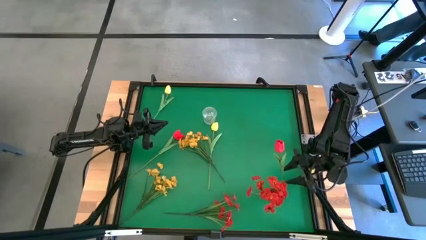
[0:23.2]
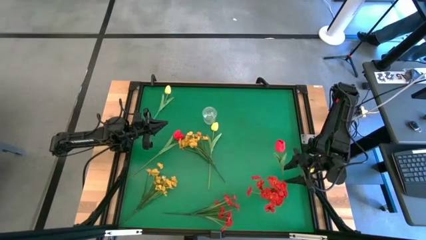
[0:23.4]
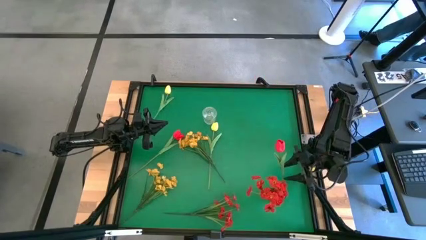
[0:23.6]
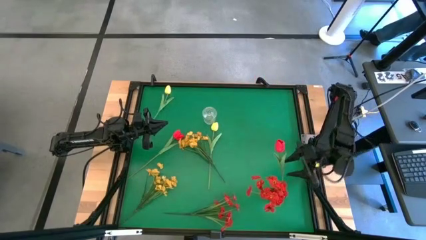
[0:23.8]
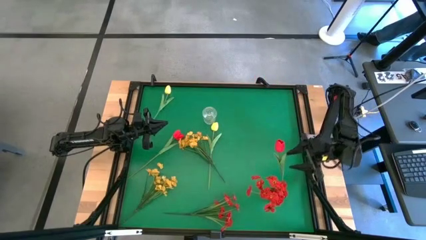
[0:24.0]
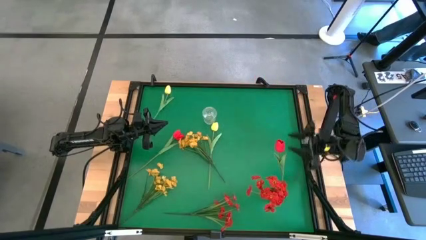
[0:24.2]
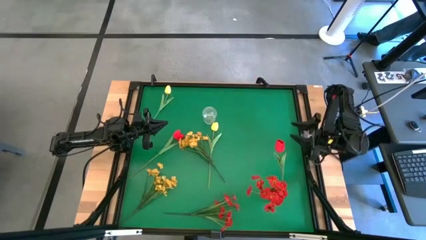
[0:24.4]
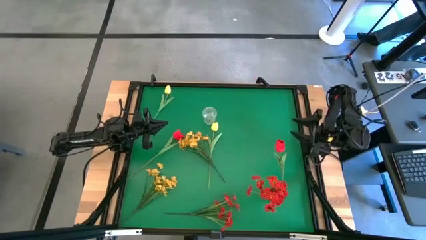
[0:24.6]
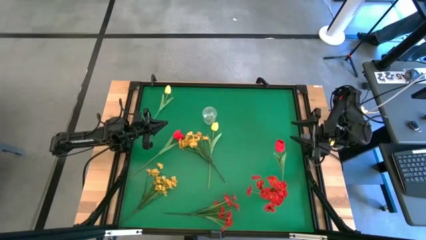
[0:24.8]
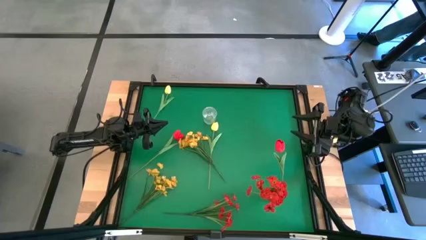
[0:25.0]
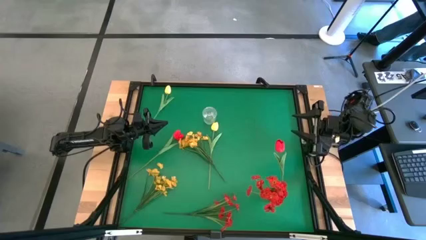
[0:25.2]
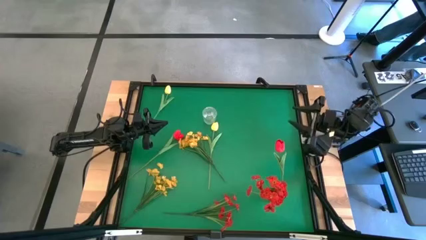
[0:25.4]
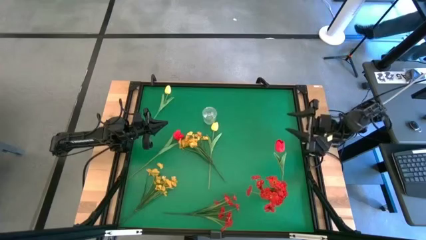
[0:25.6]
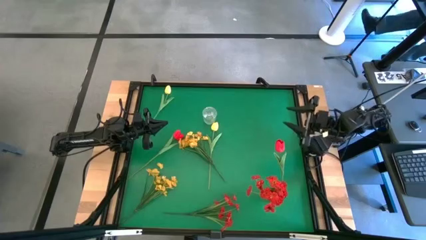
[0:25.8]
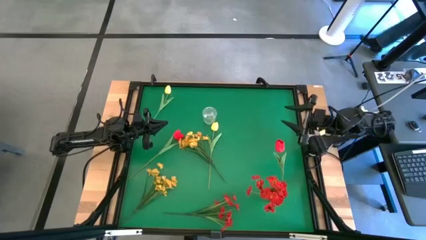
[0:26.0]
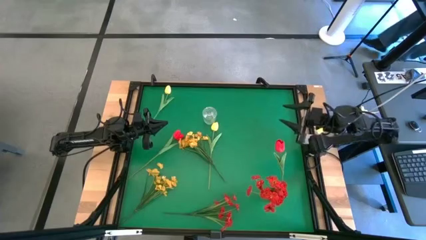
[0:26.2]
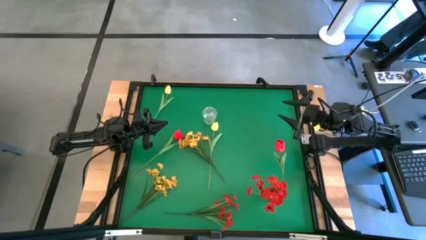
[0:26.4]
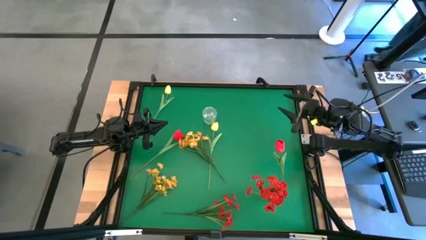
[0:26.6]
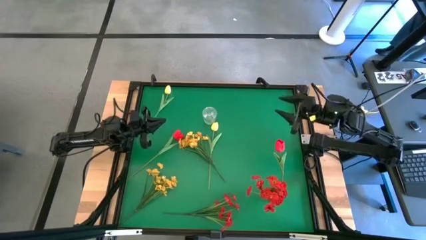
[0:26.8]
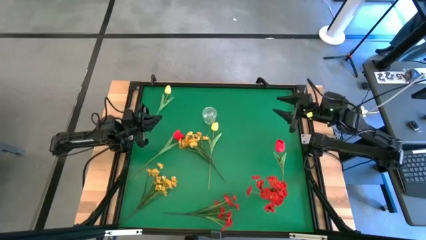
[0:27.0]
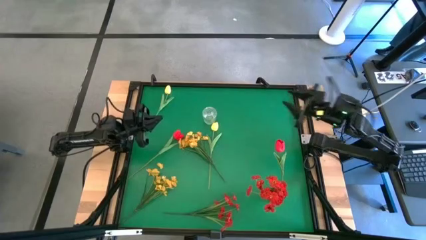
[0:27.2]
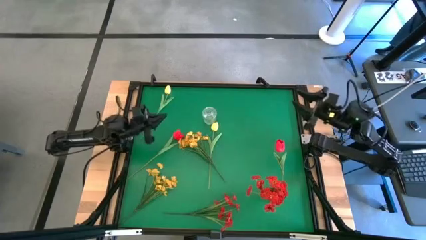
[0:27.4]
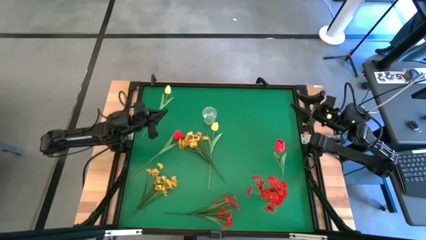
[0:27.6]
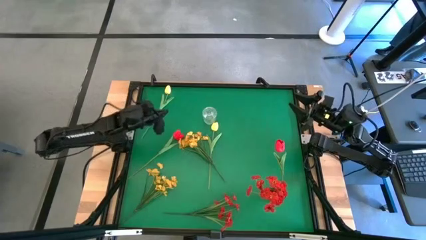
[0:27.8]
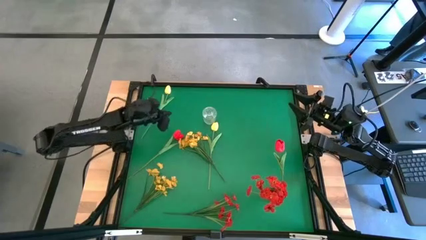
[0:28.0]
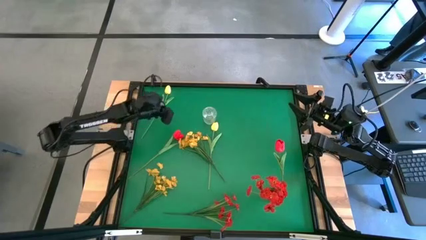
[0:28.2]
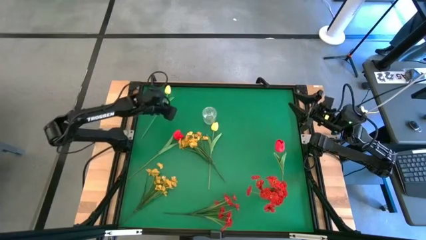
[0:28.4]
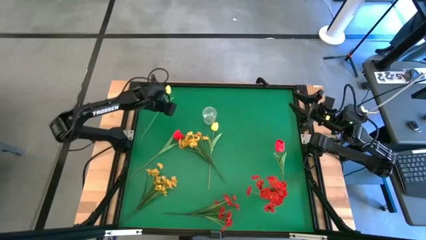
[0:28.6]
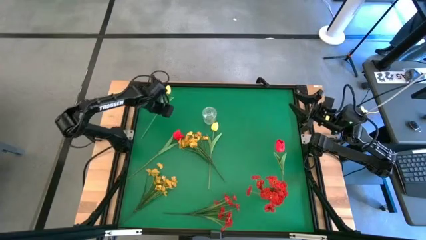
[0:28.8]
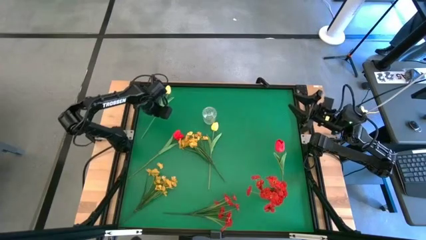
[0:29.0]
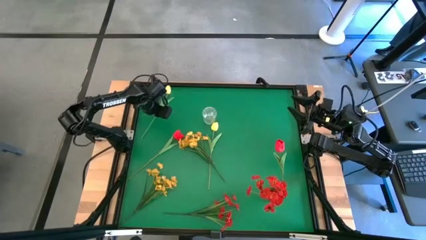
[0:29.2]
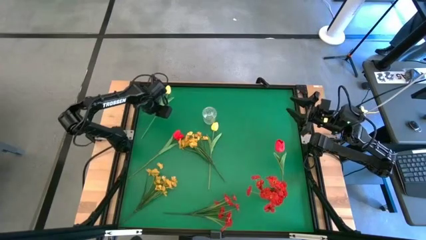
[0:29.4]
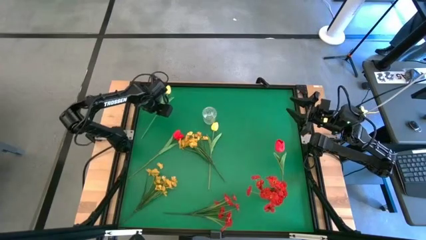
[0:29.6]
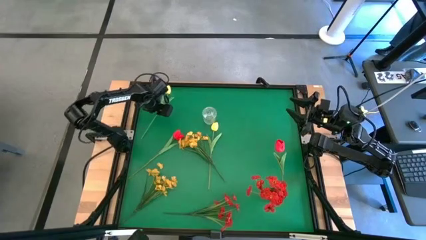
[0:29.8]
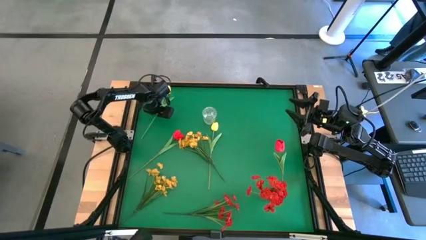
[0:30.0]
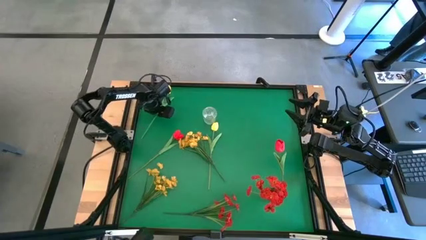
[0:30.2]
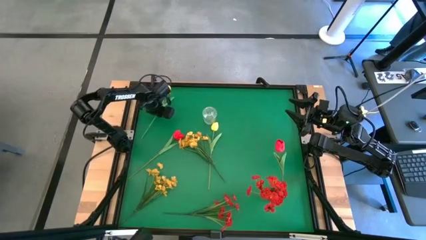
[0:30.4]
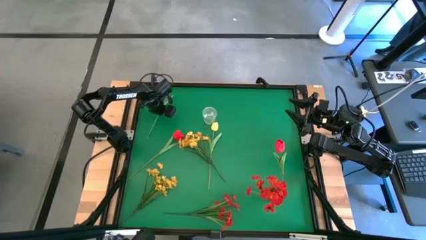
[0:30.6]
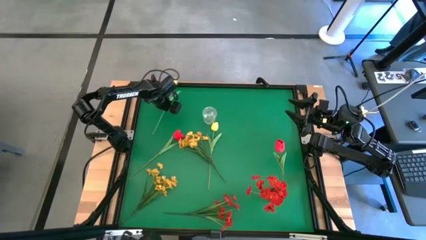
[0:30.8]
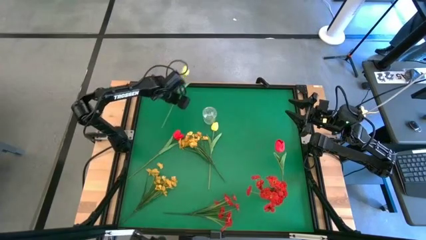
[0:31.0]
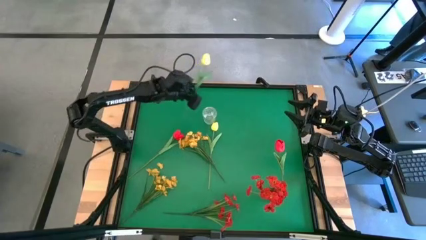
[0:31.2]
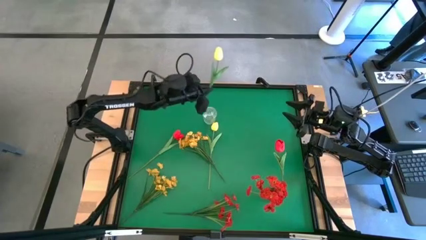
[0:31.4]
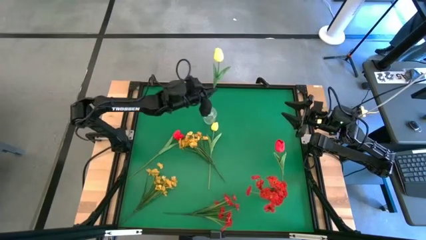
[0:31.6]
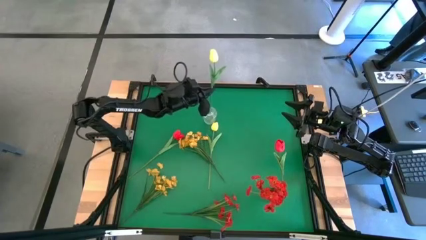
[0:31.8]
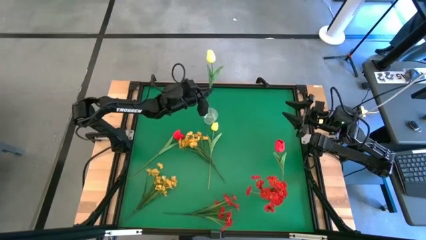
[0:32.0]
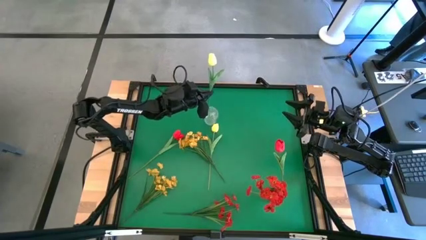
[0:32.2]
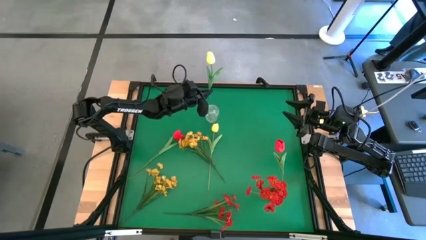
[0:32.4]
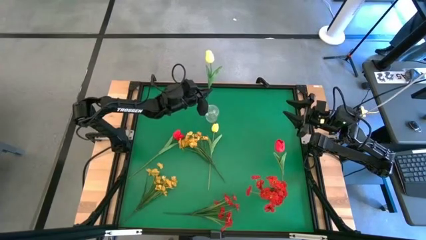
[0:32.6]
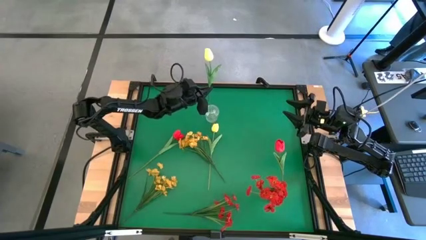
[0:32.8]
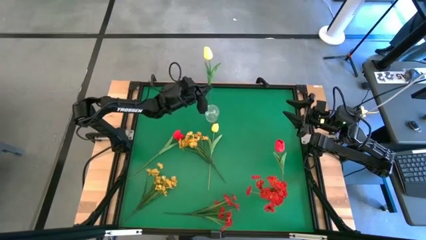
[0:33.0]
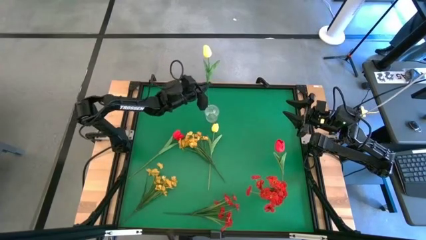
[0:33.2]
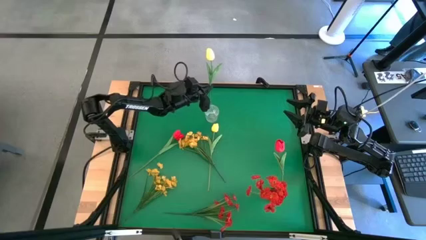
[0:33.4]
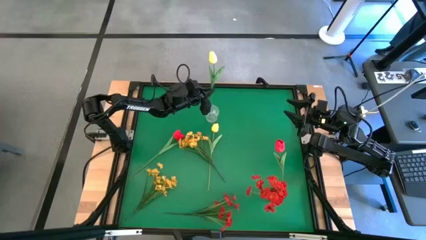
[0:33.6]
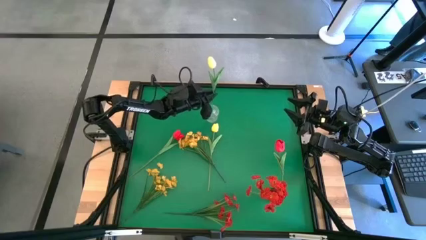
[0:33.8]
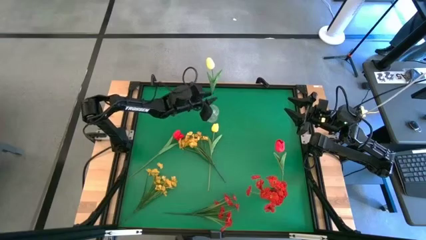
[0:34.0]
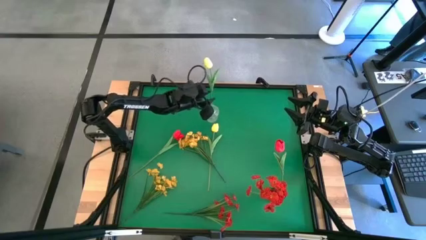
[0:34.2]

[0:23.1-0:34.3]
Task: Sort flowers into vase by color
Put the top left yellow flower into the transparent vase

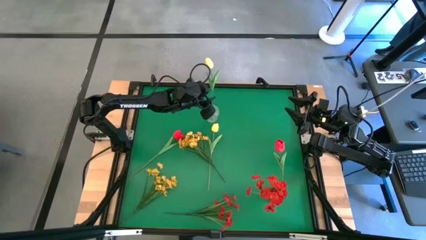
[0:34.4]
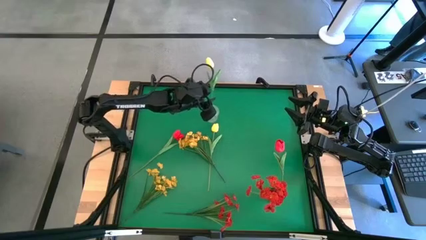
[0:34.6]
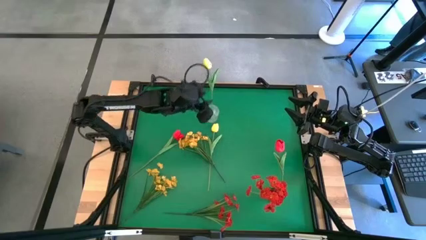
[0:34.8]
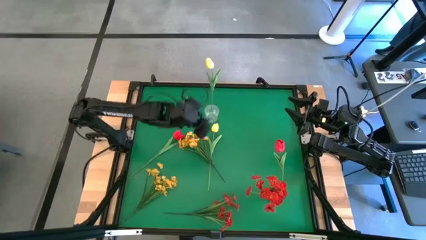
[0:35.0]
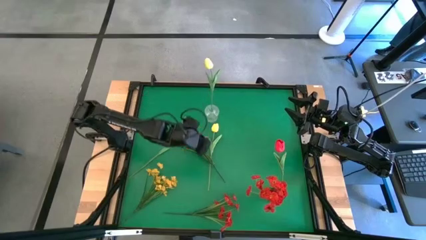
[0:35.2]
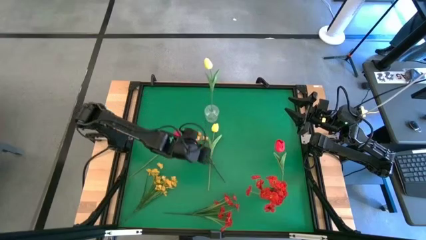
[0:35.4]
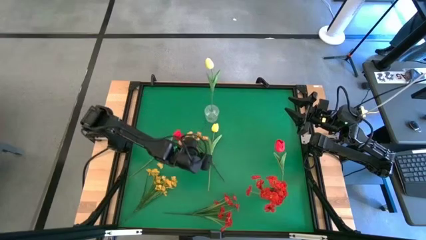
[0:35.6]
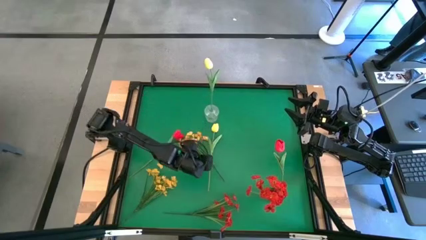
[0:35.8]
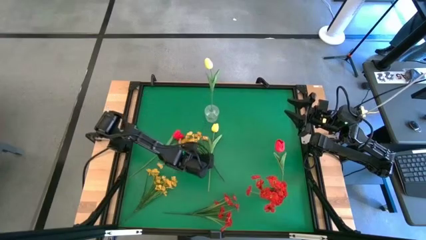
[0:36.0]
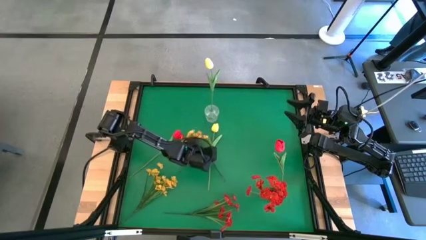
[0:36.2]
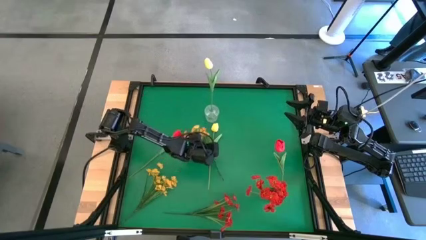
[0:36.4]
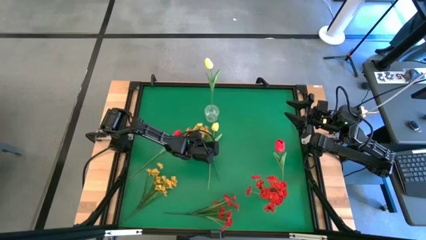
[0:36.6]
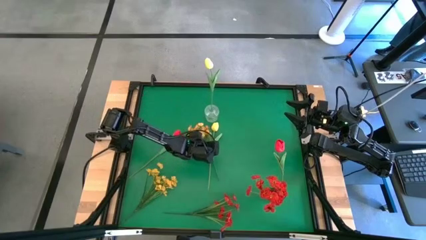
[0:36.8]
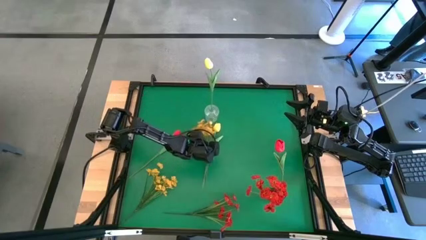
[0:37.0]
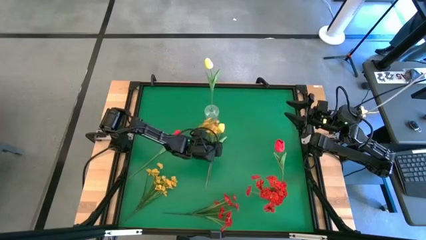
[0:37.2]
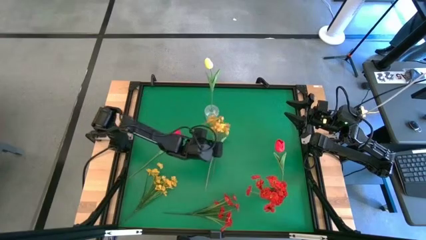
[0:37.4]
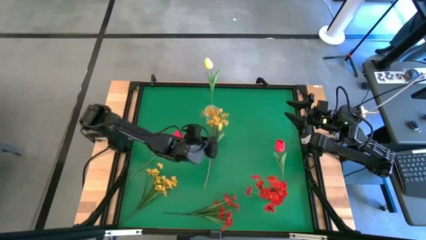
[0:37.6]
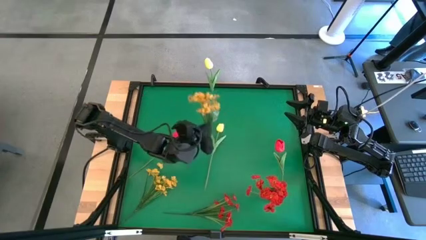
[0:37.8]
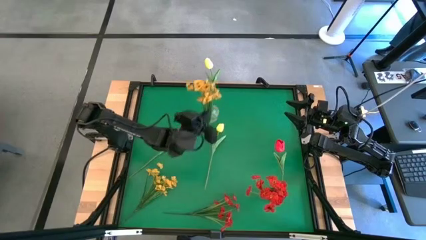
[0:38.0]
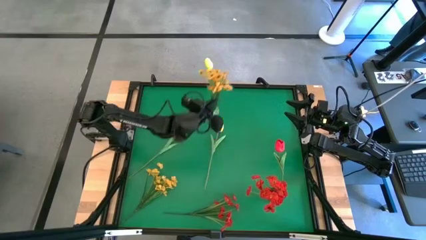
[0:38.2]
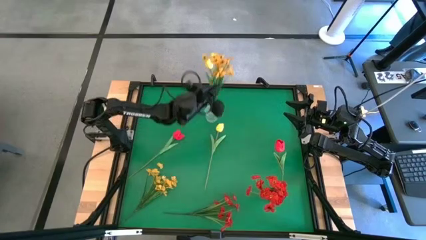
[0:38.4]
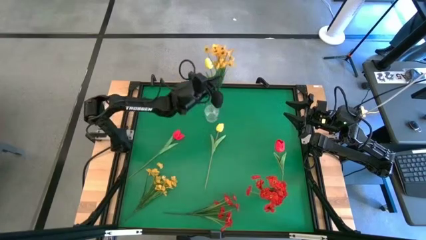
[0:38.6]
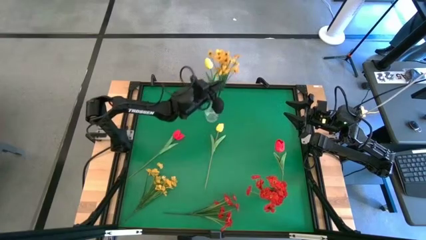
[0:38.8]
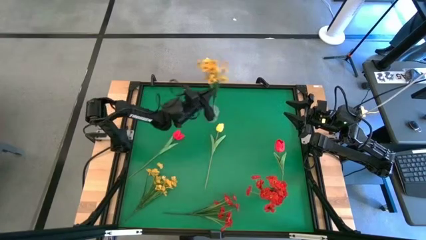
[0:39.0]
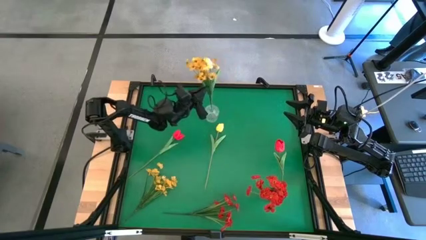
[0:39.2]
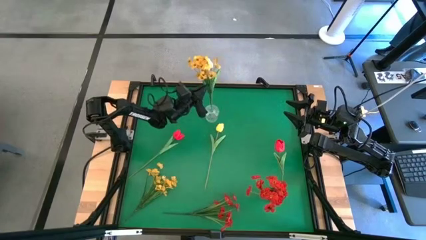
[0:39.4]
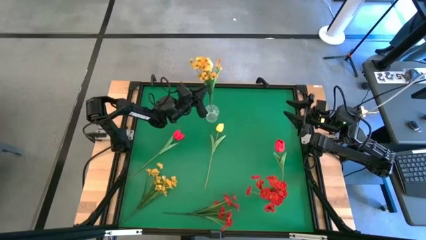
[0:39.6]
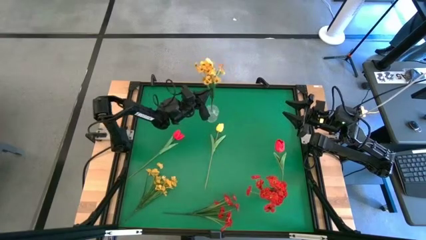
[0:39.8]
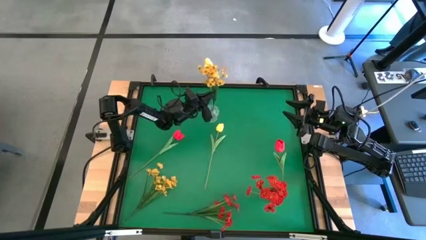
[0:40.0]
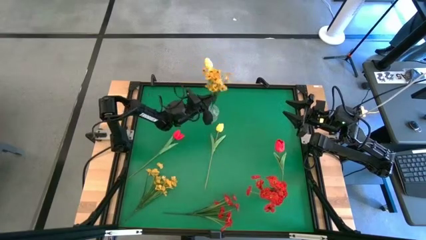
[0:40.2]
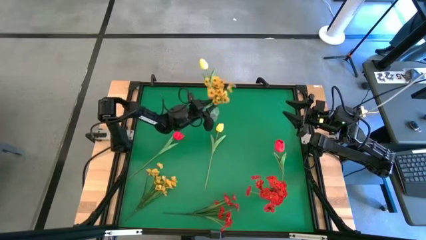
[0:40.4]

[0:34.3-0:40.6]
Put the top left yellow flower into the transparent vase
